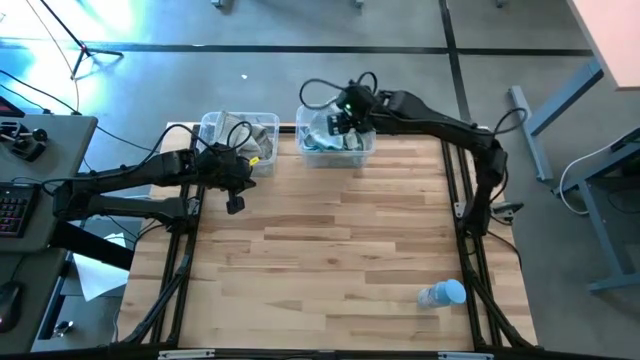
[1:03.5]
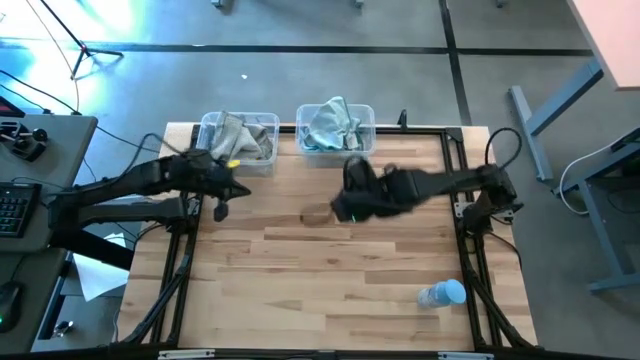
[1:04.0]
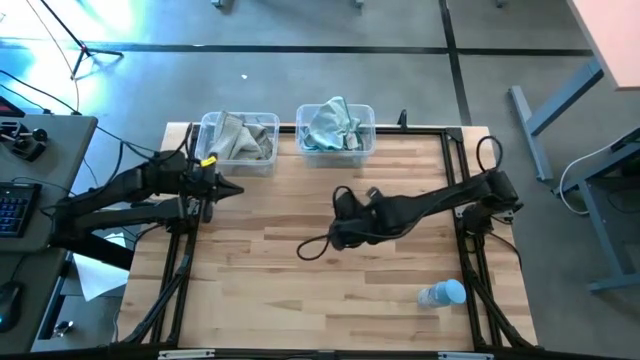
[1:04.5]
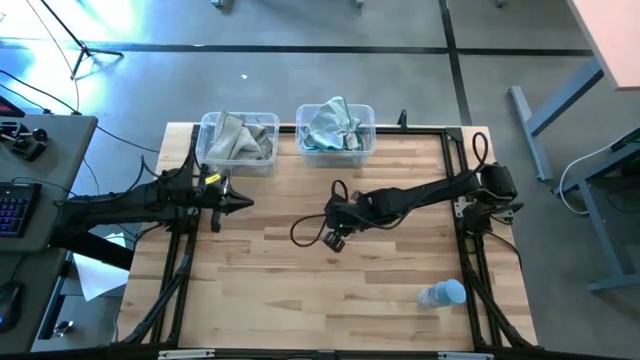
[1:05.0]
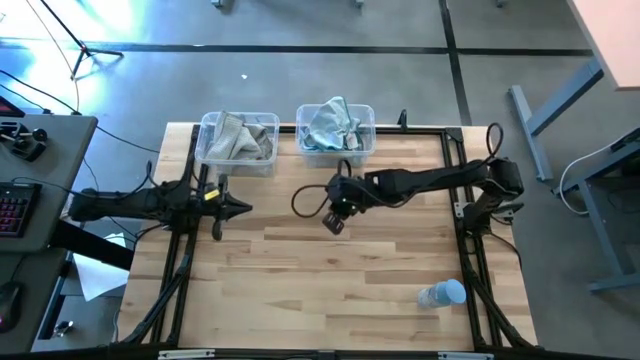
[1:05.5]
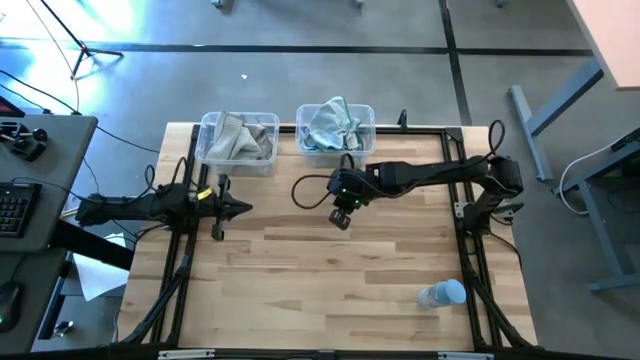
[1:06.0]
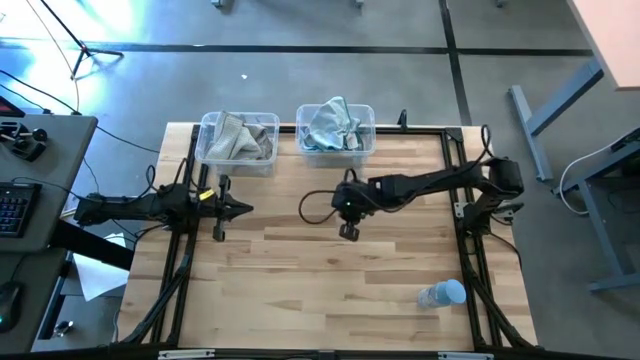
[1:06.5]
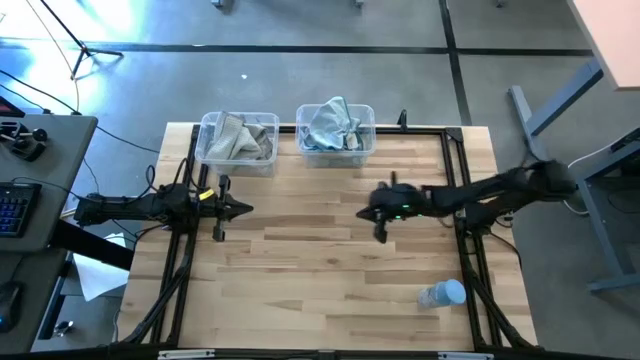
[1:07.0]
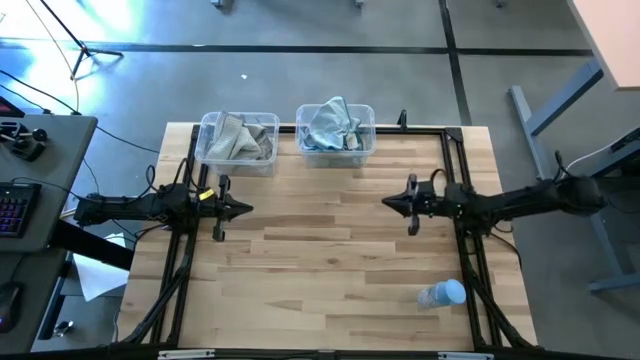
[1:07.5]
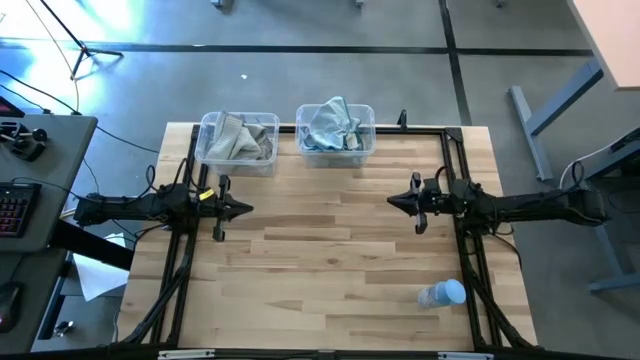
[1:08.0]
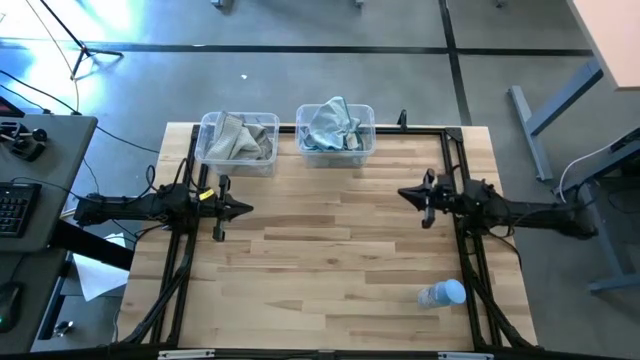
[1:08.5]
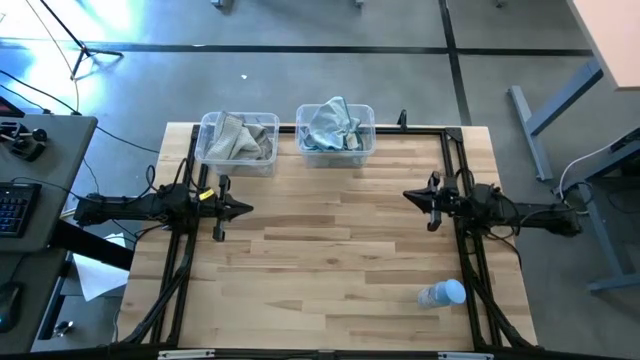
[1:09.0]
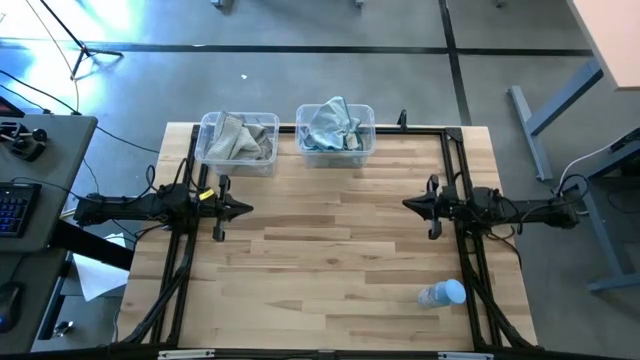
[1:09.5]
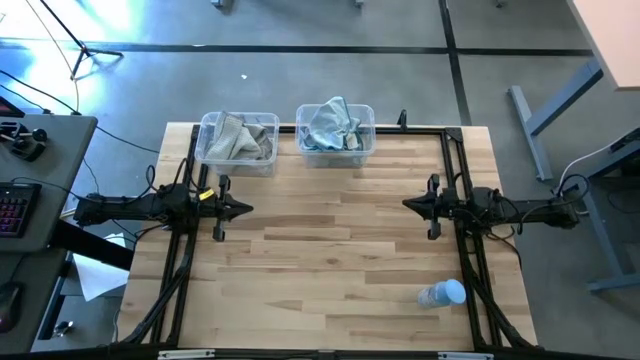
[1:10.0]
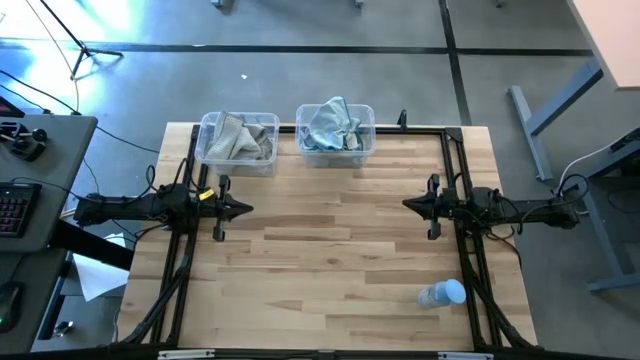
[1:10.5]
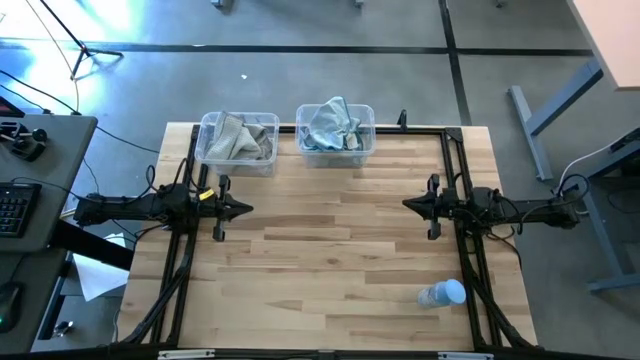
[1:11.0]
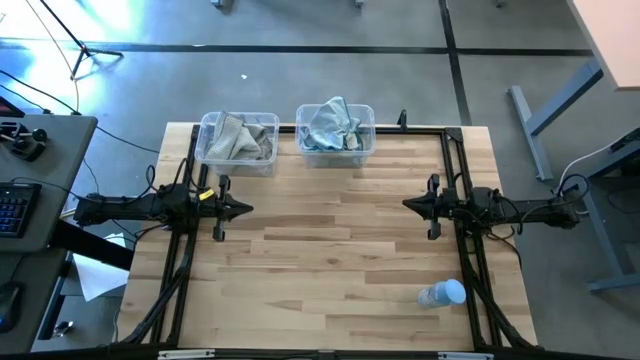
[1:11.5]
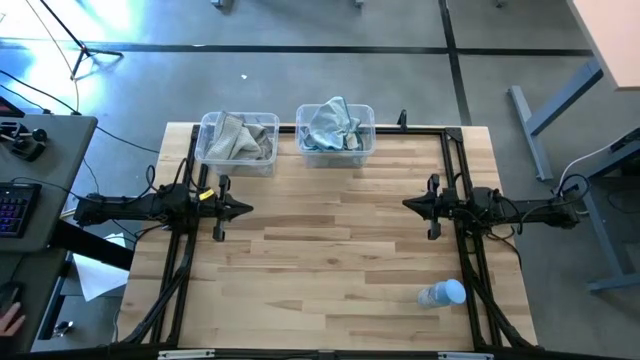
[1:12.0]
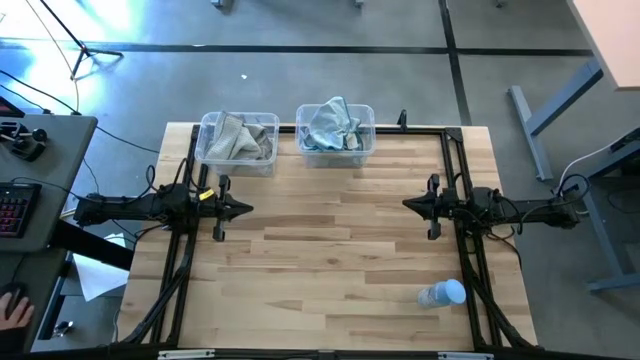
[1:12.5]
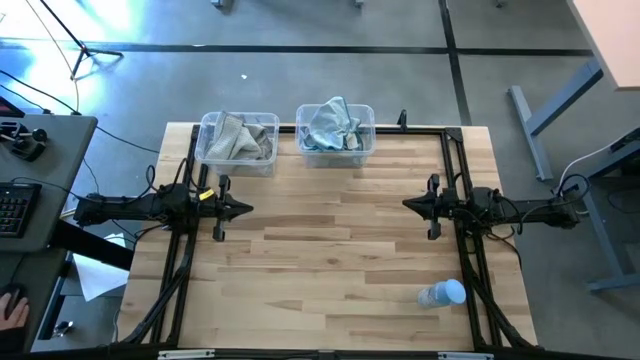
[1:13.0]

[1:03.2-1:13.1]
Task: Sort microfiber towel by color & place in baskets
Return to Home Position

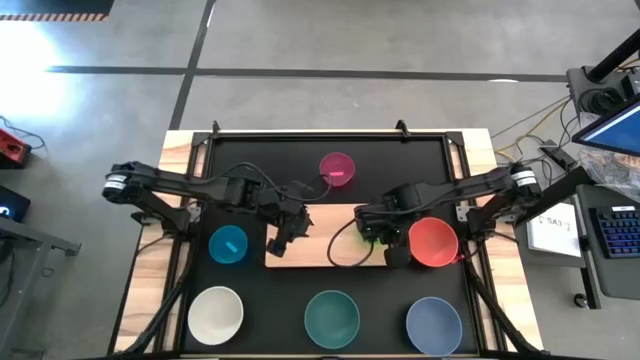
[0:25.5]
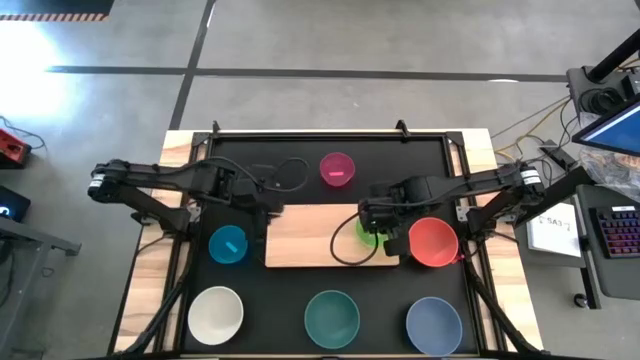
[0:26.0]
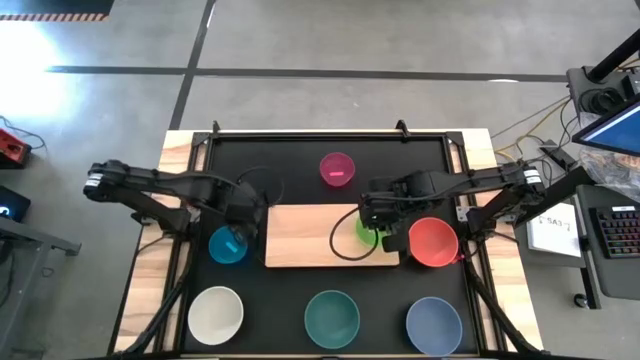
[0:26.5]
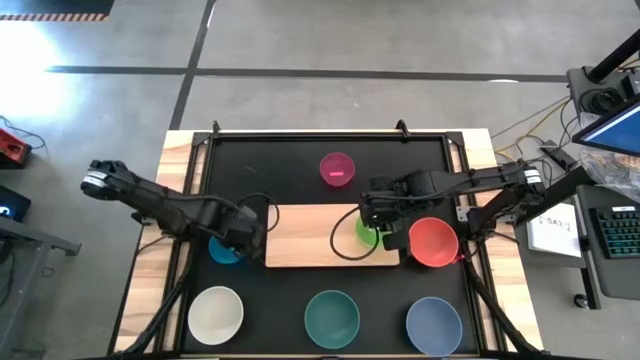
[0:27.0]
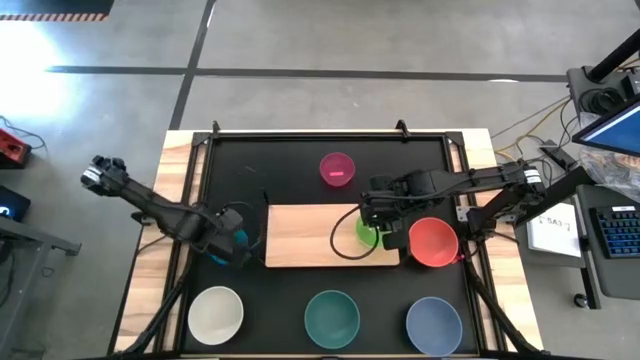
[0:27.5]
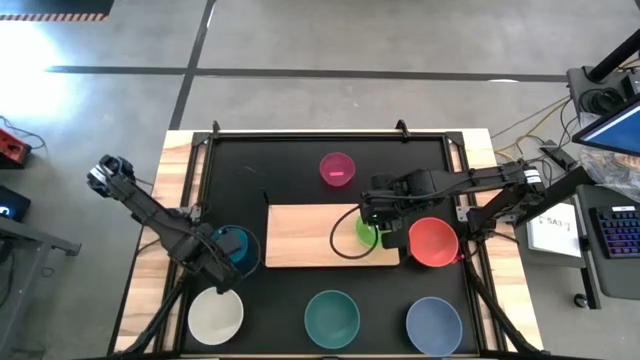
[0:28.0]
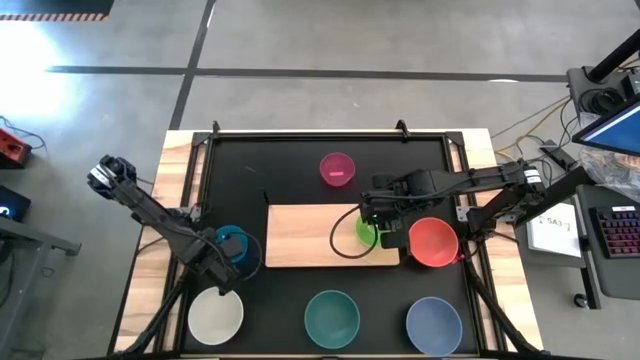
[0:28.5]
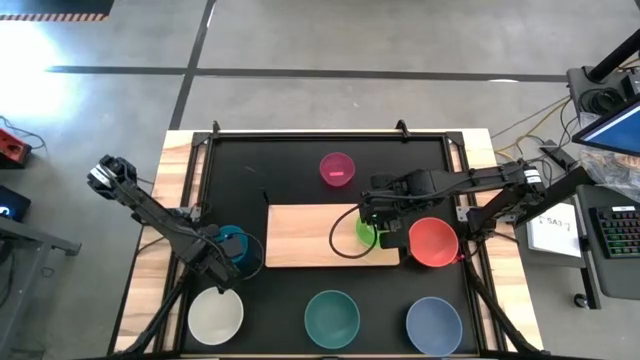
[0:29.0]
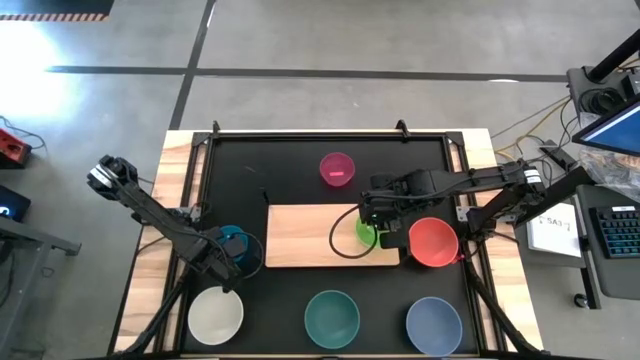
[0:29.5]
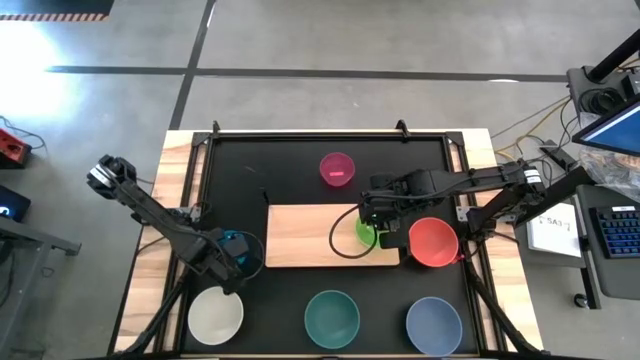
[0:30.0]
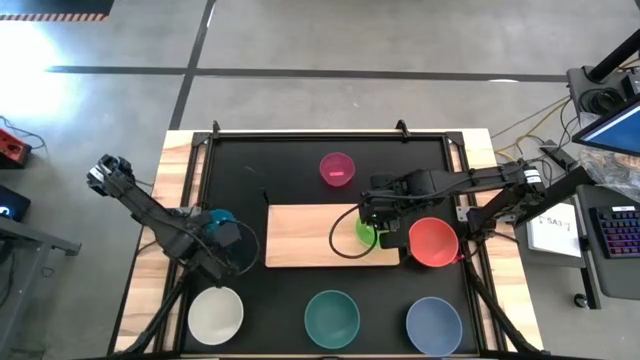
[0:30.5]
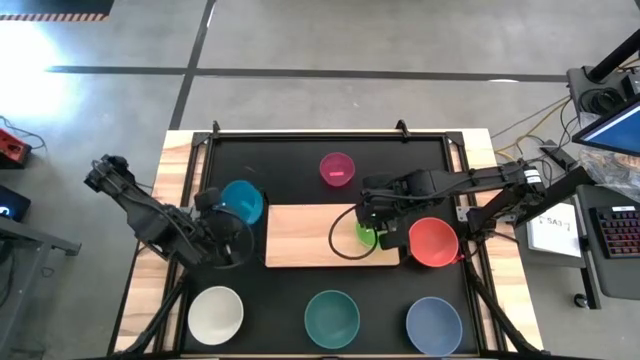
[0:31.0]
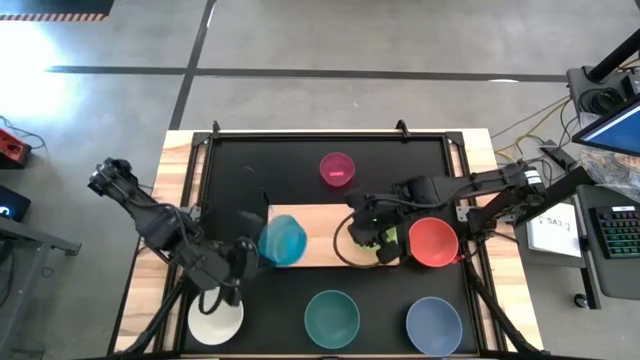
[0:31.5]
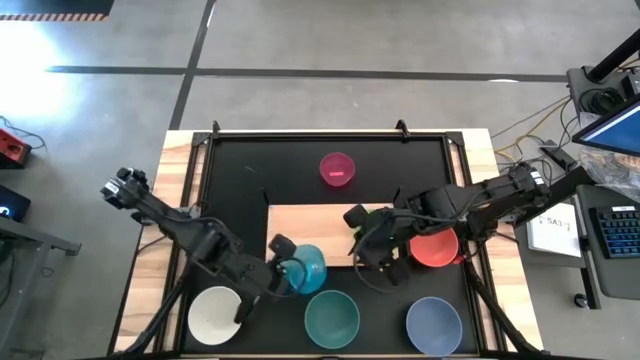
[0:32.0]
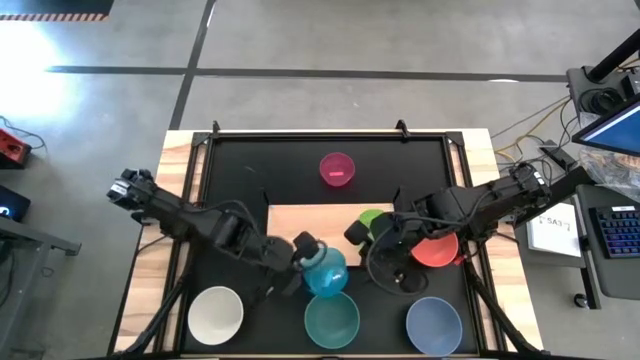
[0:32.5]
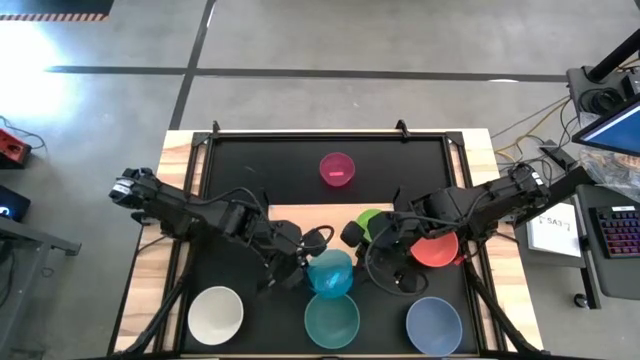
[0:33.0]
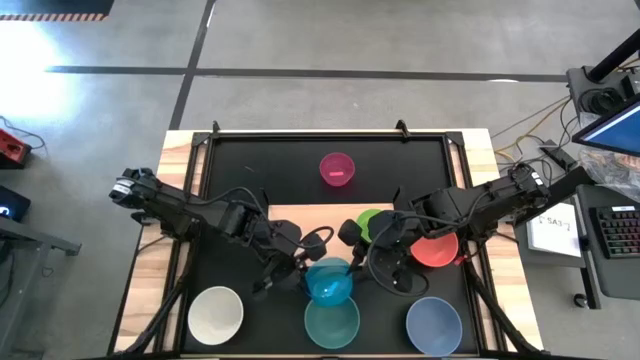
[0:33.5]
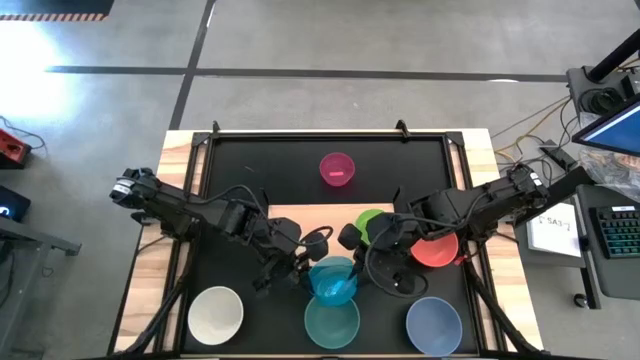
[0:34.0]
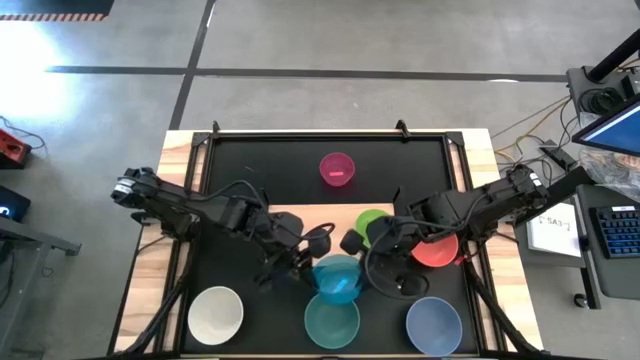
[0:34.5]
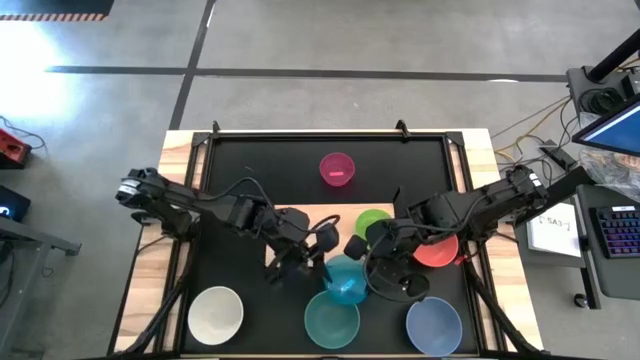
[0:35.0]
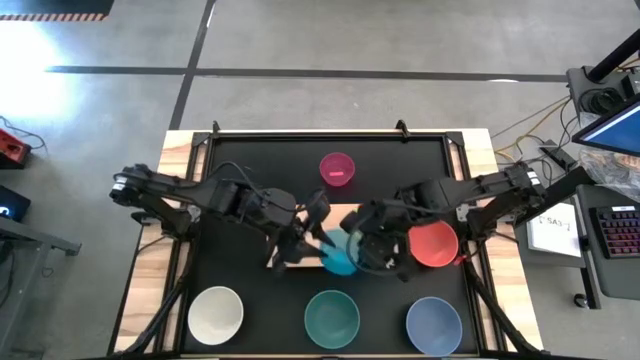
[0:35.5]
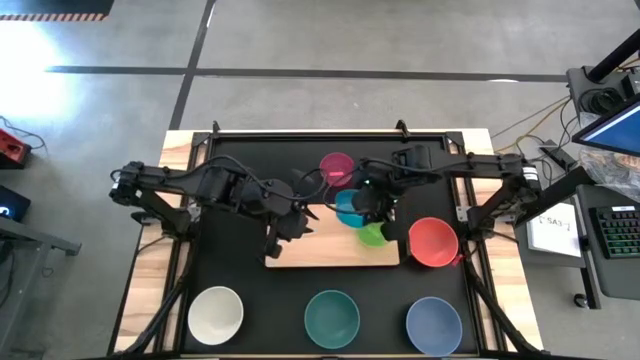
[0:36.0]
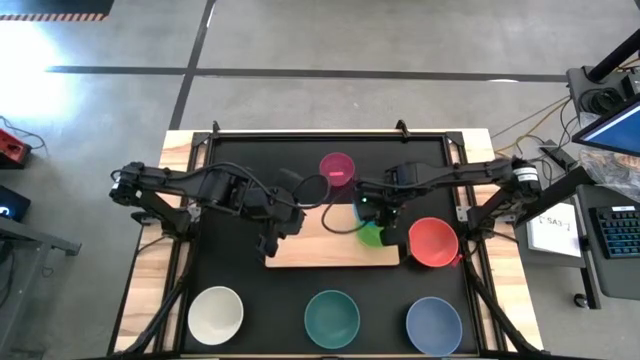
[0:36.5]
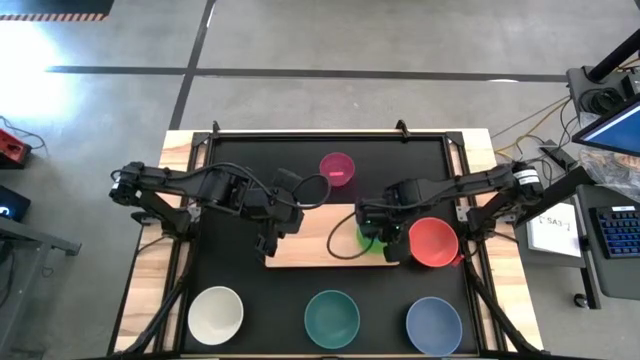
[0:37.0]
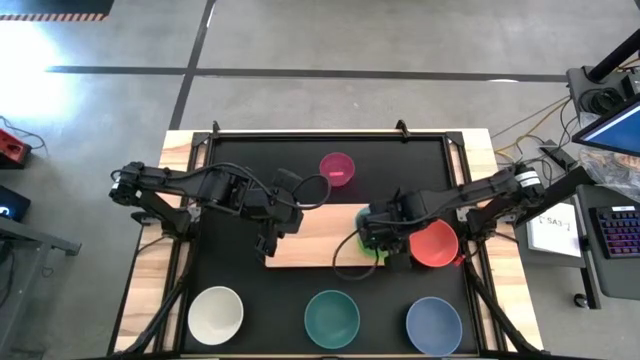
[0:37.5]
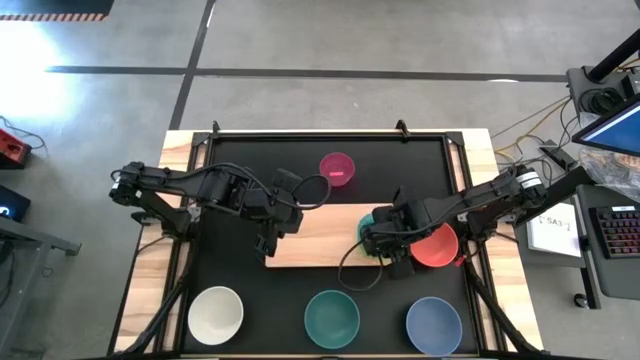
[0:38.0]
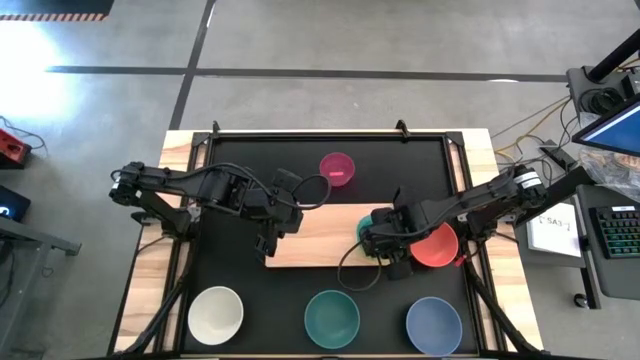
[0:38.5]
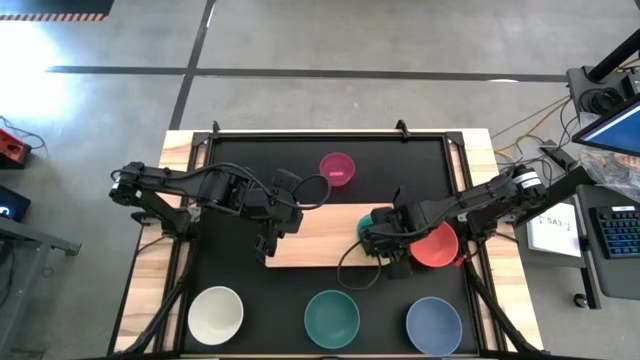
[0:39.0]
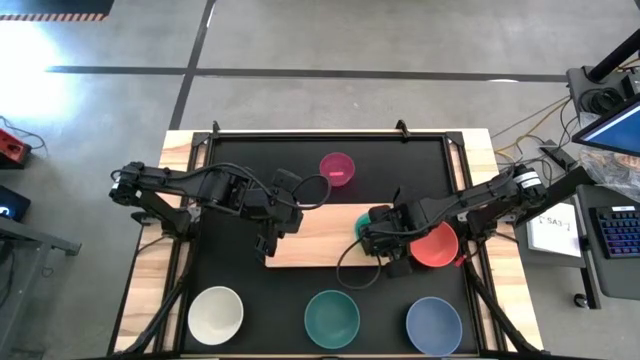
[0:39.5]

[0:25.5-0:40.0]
Task: Place and stack bowls onto a shelf
Stack the blue bowl on top of the light green bowl on the shelf
